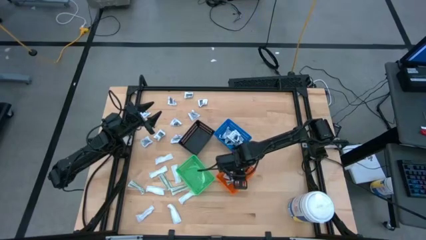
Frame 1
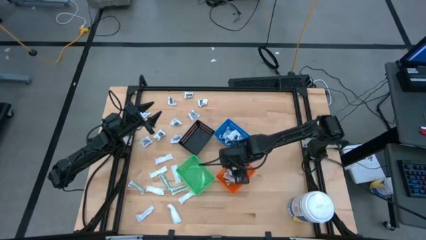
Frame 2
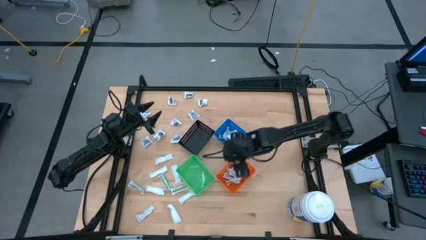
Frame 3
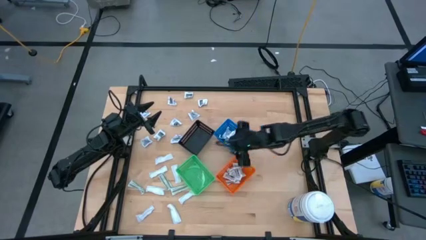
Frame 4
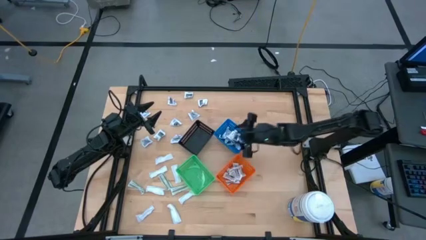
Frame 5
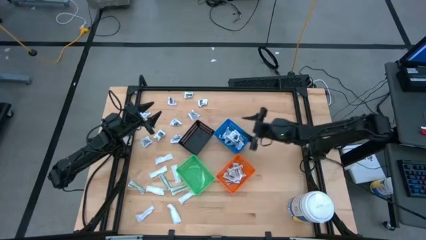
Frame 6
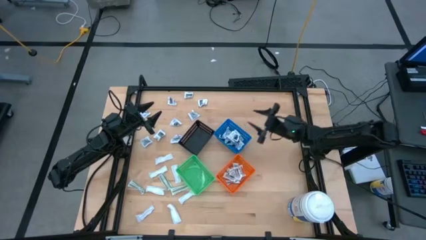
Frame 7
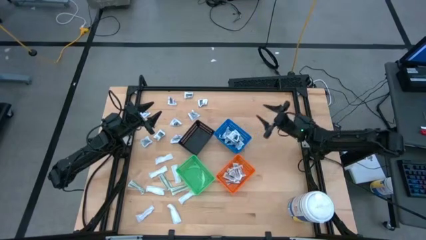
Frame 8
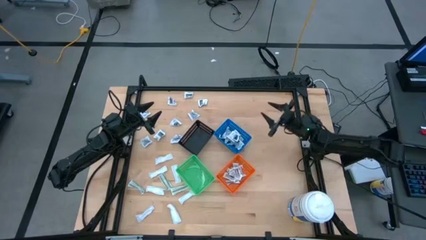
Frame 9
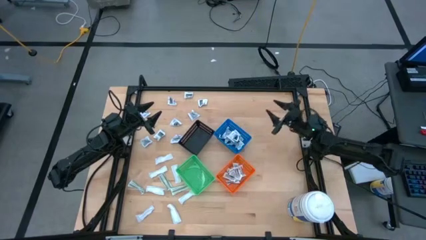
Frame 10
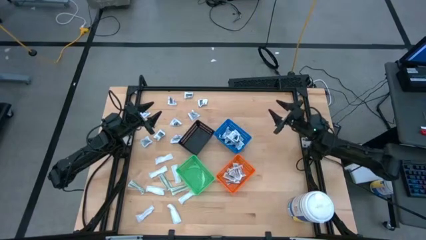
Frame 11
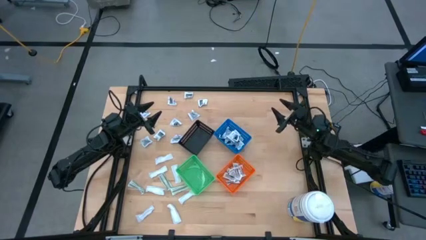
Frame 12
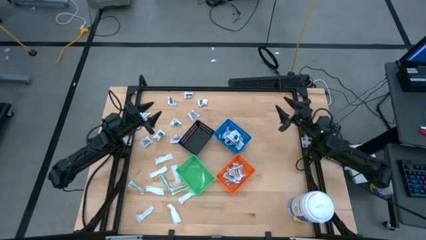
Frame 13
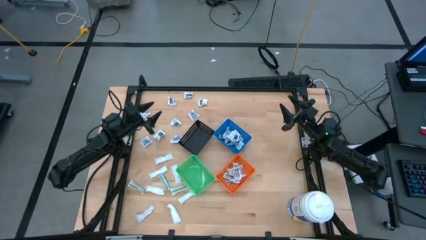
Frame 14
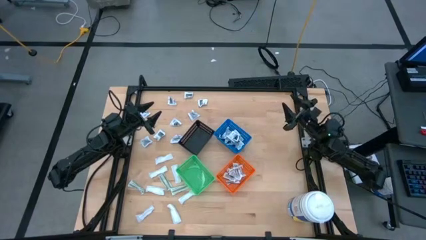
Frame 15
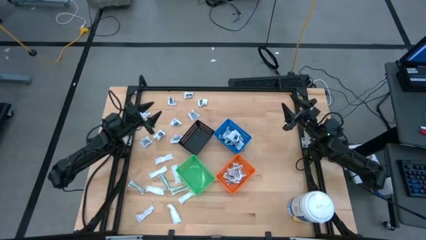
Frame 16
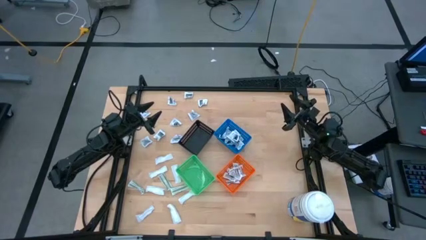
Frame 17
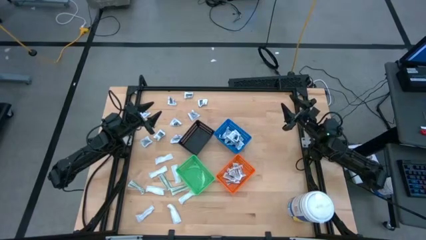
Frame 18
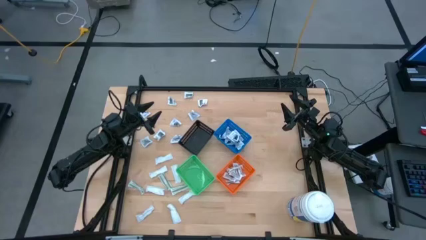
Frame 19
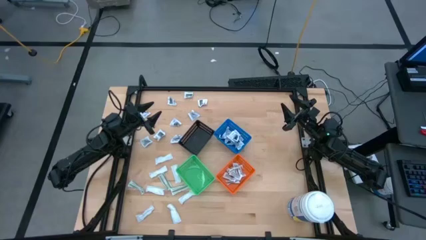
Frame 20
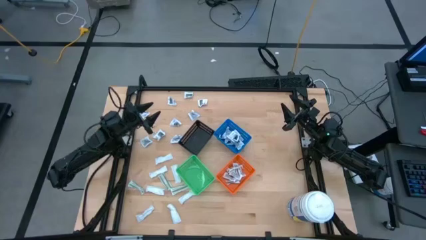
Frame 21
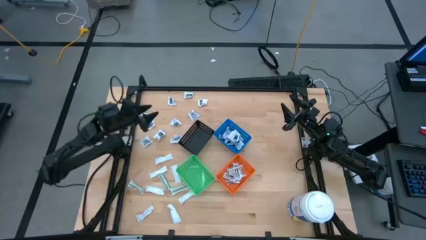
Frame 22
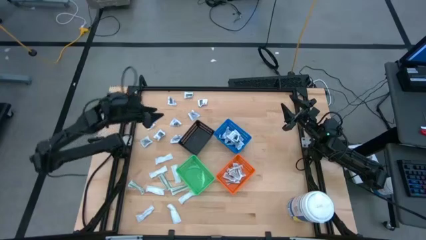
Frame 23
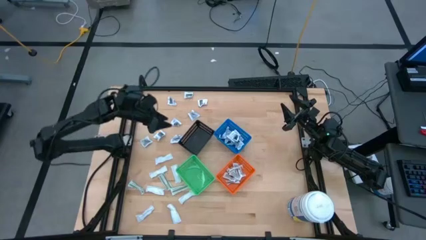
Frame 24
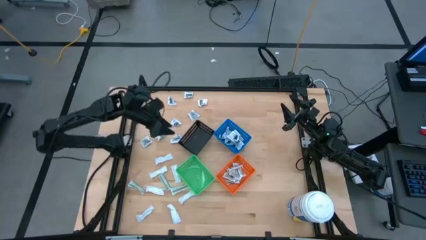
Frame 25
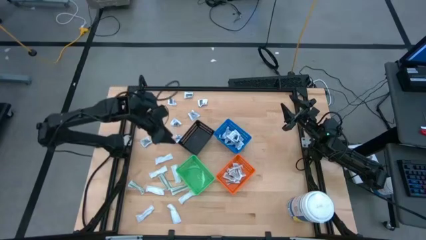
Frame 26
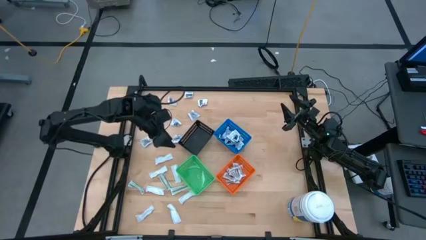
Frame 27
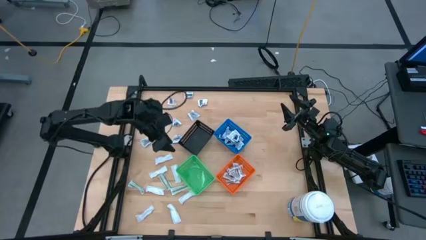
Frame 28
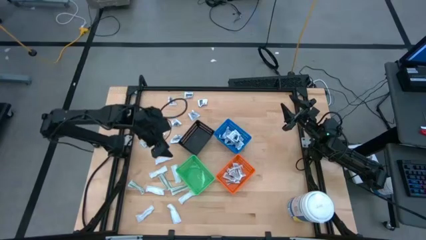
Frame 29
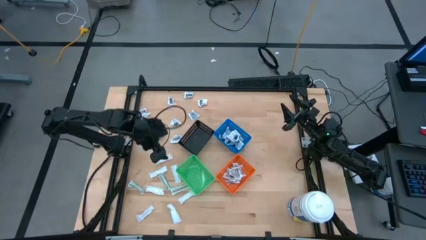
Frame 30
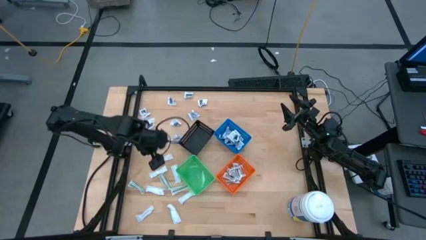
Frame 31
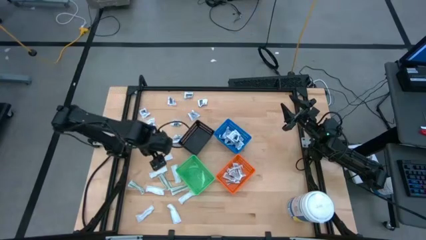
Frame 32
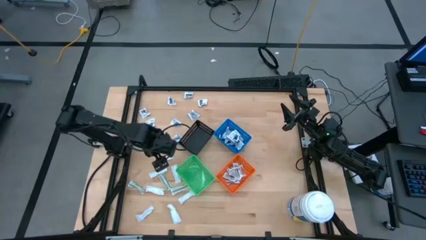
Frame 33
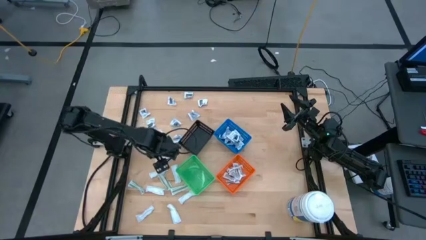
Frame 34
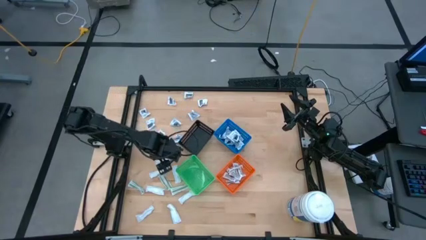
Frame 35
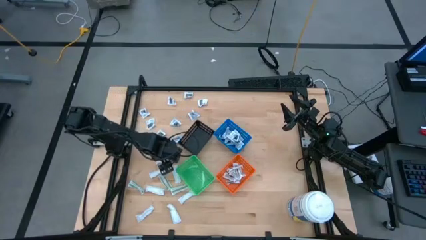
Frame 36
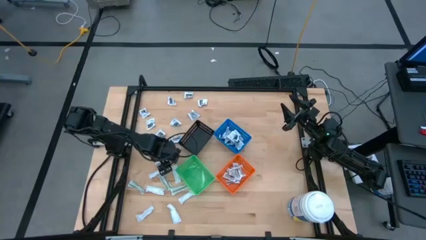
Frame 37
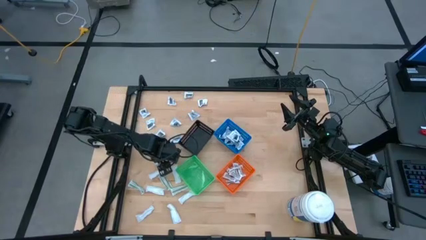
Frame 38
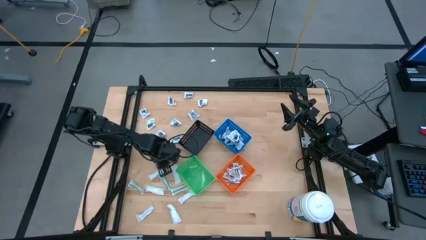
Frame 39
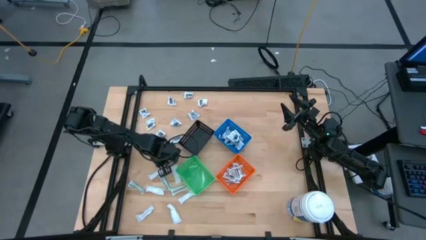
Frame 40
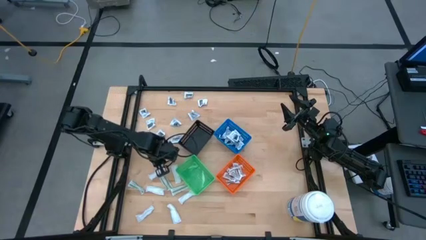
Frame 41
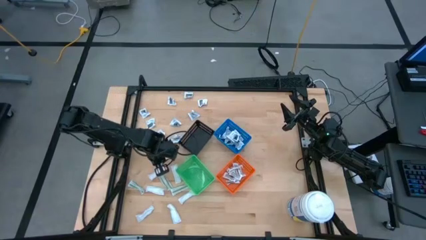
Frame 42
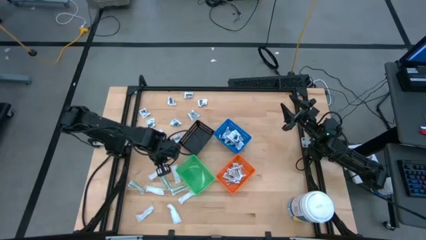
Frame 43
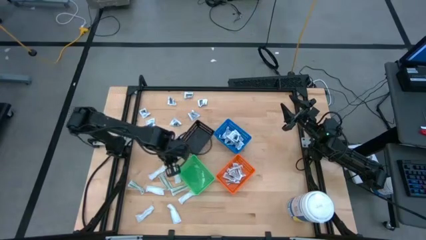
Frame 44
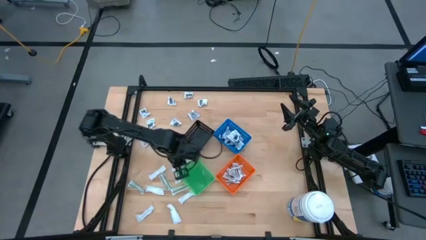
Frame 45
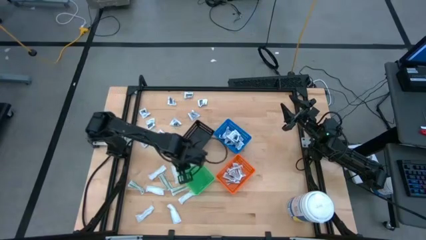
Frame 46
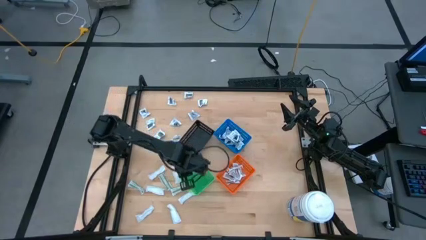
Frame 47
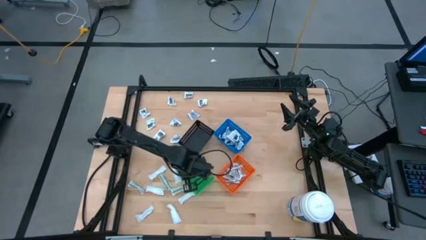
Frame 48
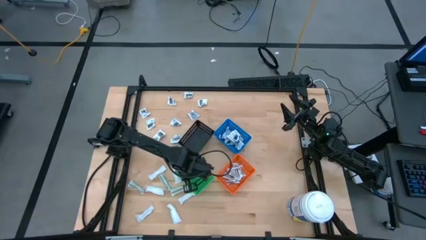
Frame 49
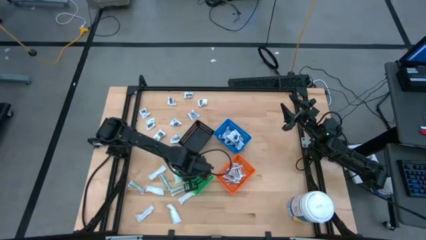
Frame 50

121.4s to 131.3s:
Task: Pick & Place First Aid Supplies
Put the green bandage into the green bin

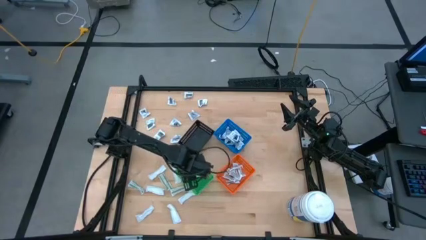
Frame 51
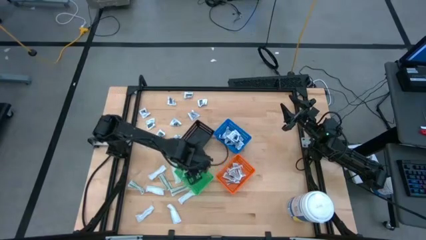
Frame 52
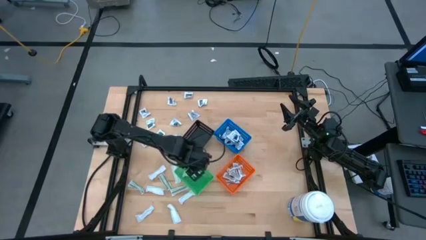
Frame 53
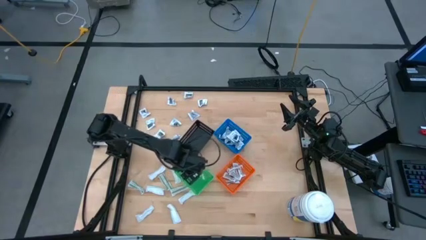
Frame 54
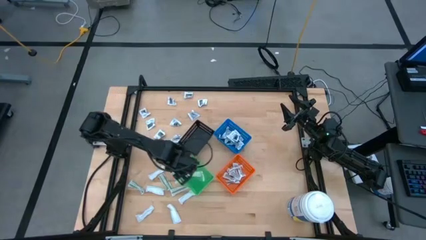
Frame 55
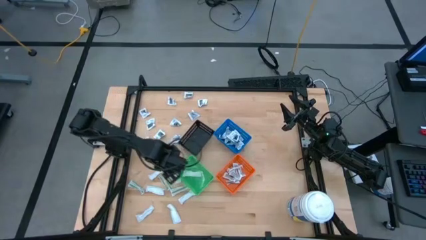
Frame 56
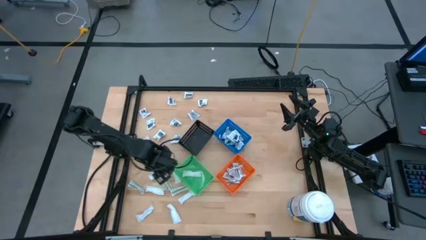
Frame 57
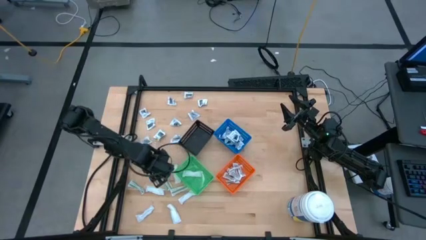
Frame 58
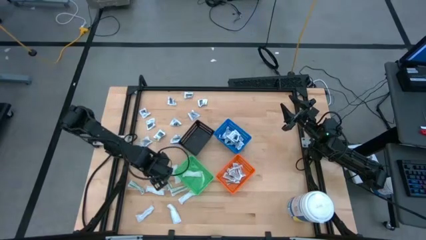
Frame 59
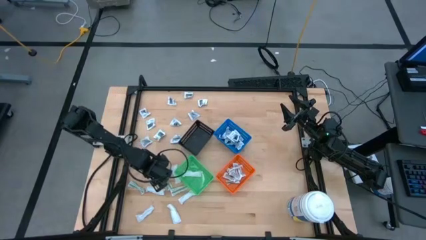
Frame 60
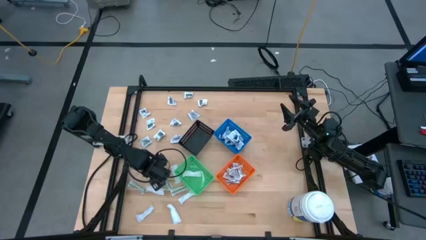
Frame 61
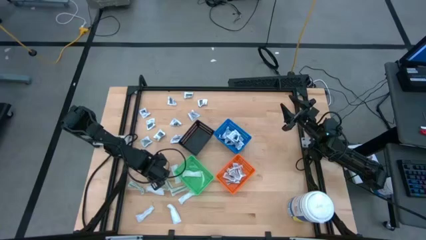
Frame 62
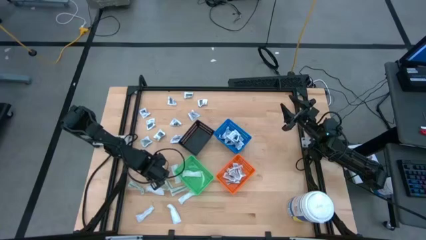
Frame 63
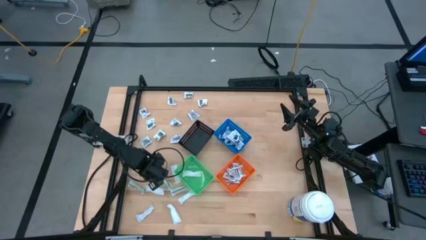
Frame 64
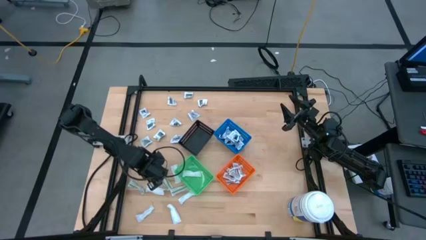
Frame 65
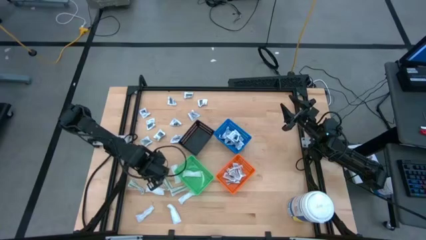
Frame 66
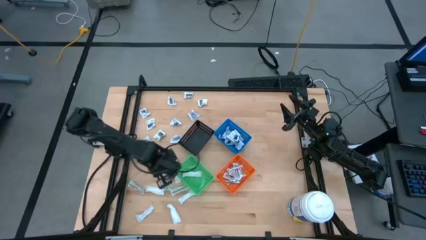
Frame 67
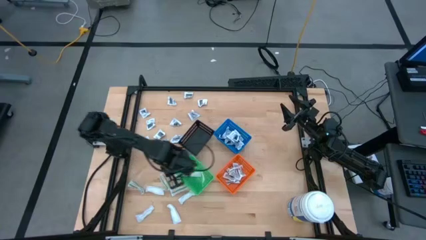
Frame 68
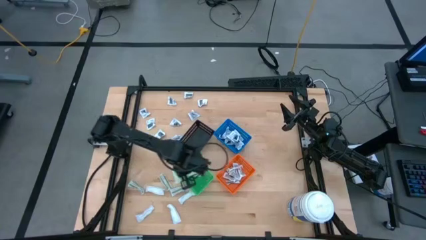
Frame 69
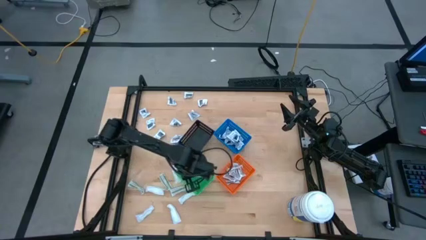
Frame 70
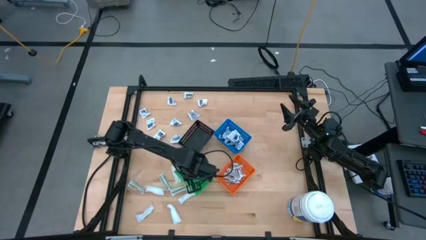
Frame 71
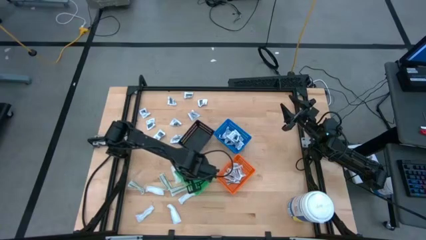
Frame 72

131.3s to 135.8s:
Put the green bandage into the green bin

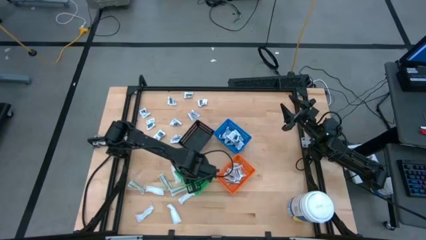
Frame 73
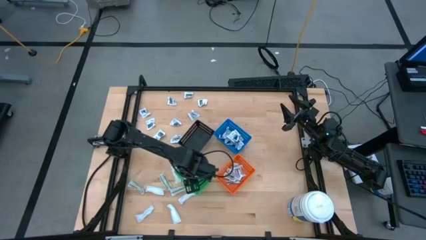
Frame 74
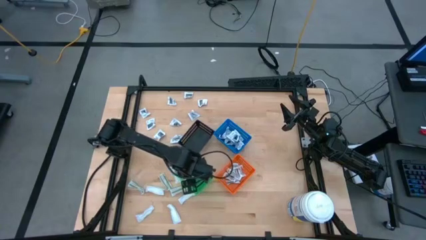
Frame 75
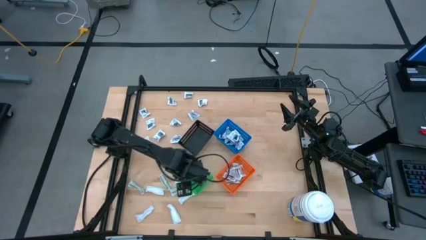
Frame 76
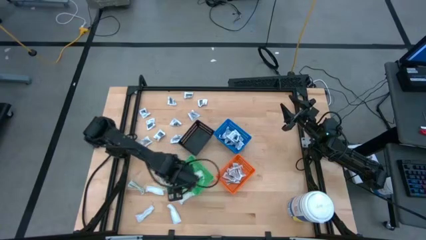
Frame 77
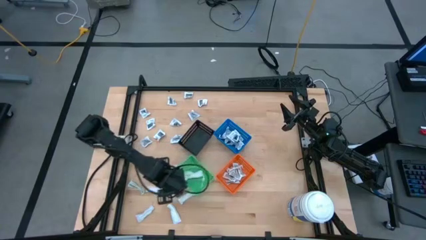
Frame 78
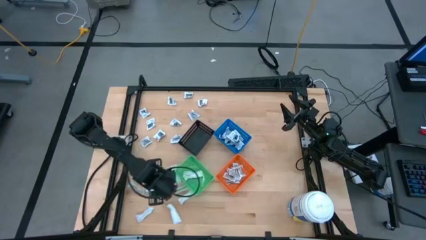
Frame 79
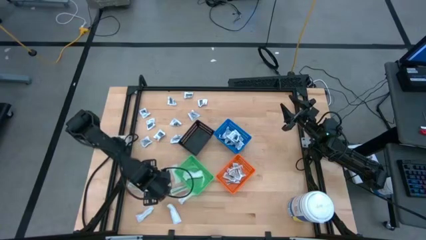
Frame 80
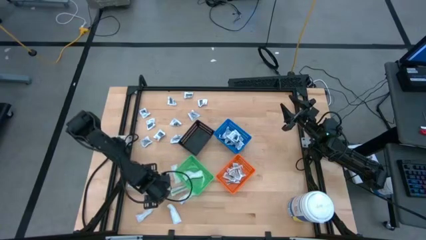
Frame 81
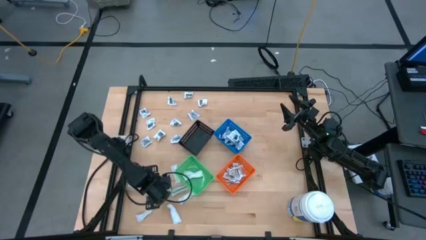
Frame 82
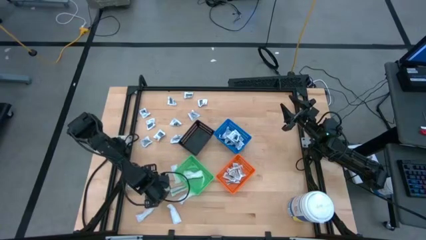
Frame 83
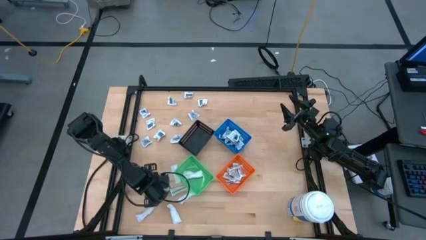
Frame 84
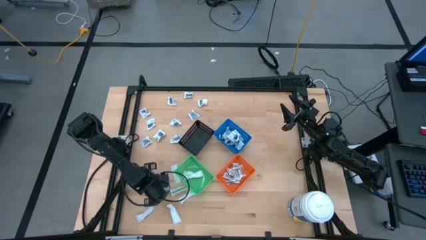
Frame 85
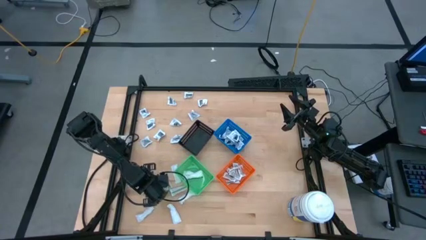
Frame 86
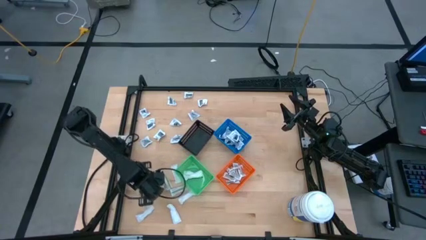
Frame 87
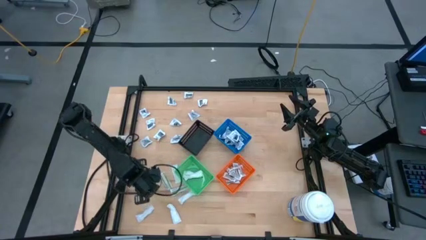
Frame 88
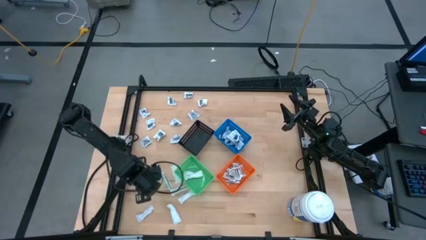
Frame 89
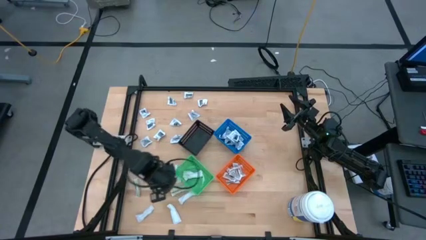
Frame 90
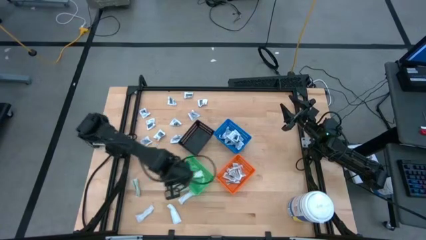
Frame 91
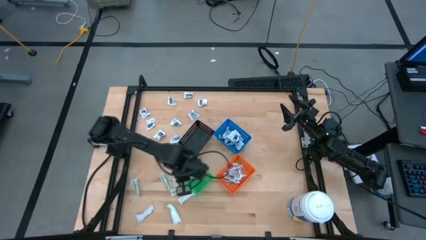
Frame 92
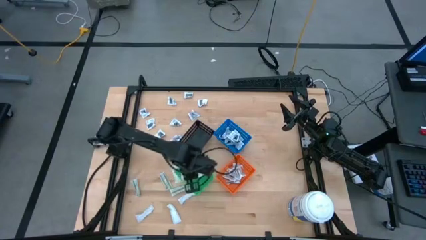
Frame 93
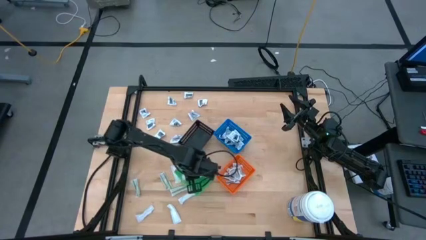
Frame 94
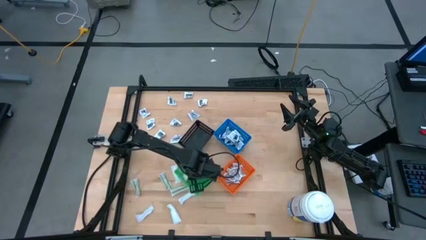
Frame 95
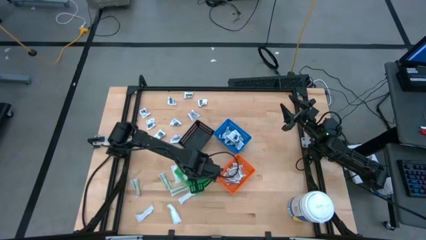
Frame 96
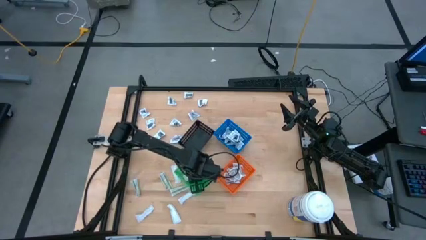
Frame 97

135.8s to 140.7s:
Put the green bandage into the green bin
